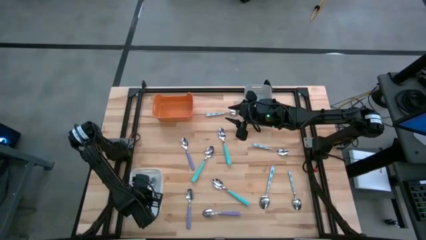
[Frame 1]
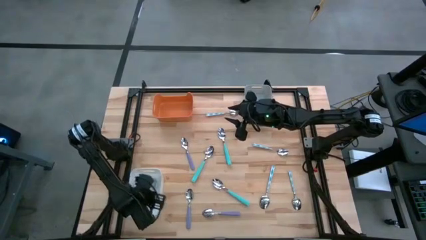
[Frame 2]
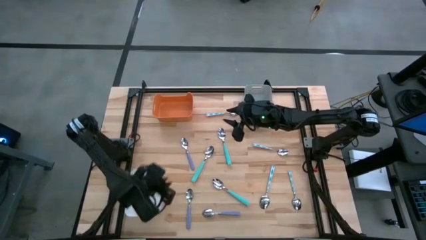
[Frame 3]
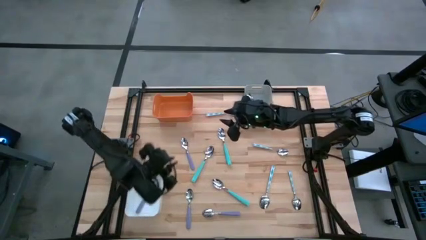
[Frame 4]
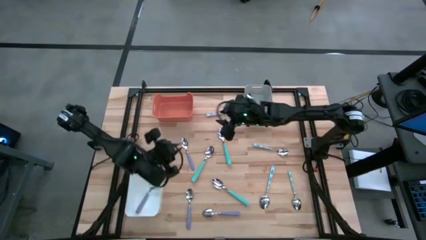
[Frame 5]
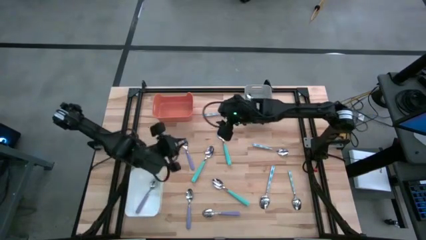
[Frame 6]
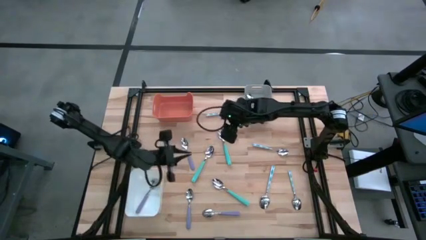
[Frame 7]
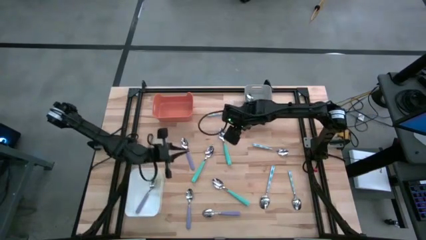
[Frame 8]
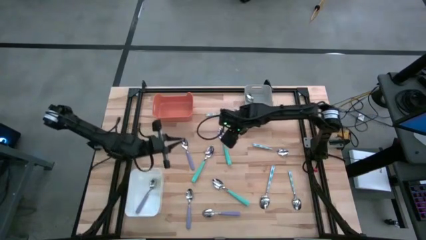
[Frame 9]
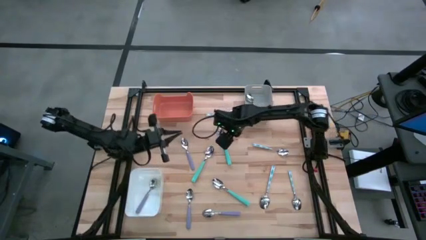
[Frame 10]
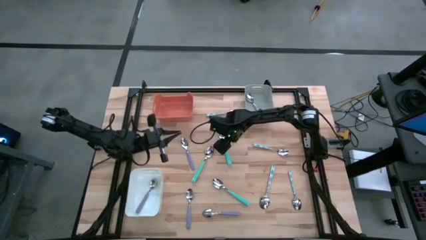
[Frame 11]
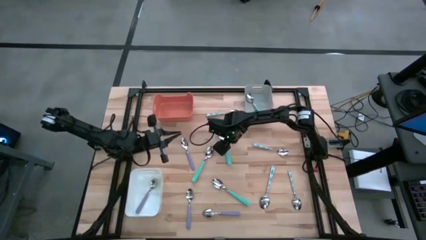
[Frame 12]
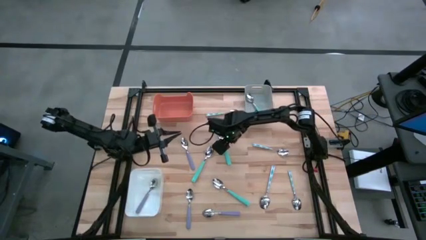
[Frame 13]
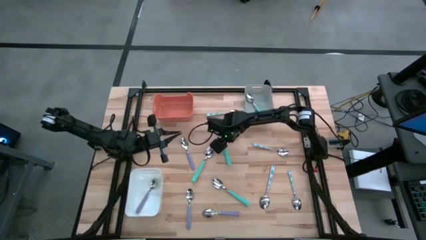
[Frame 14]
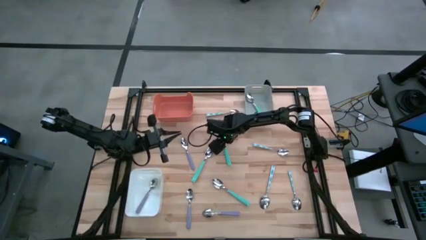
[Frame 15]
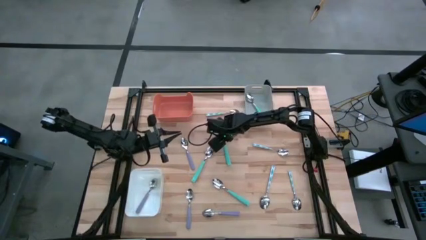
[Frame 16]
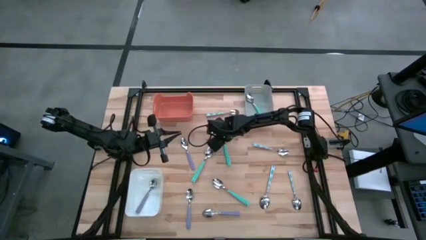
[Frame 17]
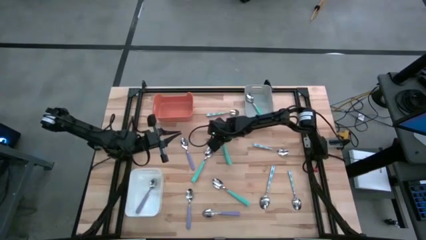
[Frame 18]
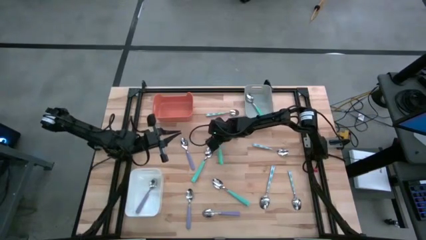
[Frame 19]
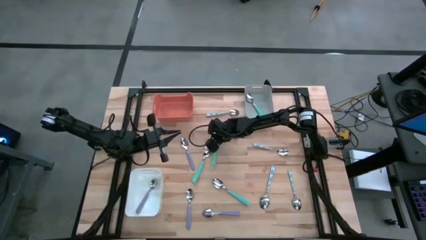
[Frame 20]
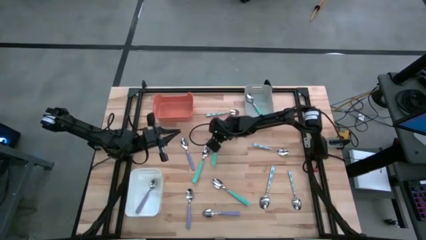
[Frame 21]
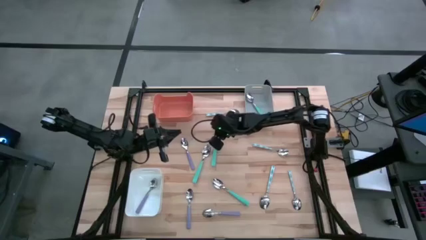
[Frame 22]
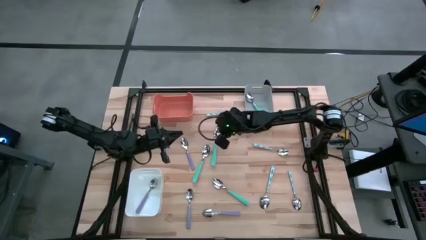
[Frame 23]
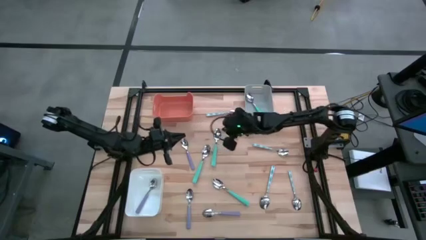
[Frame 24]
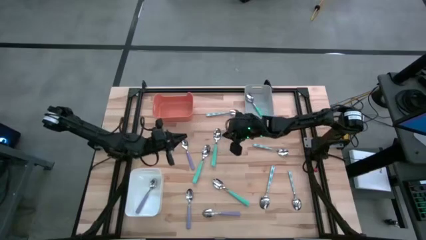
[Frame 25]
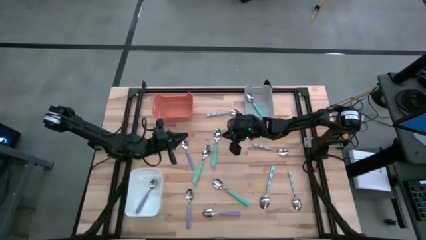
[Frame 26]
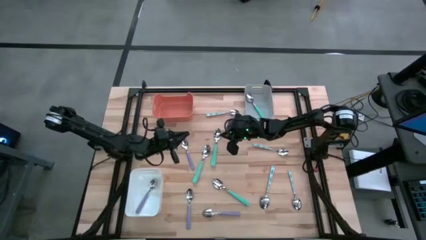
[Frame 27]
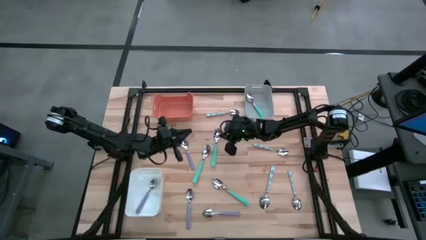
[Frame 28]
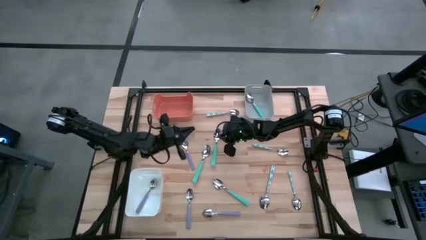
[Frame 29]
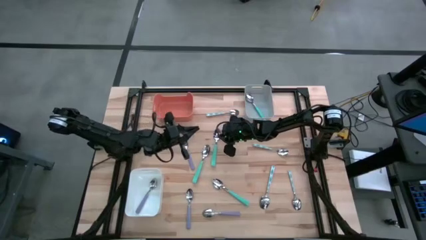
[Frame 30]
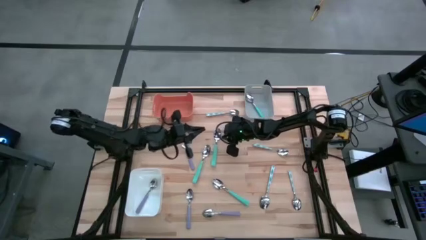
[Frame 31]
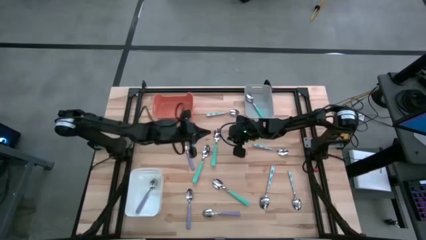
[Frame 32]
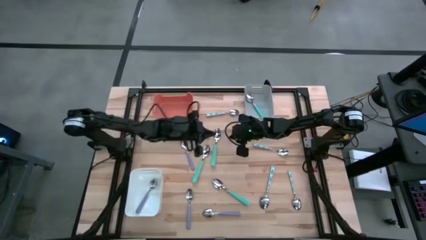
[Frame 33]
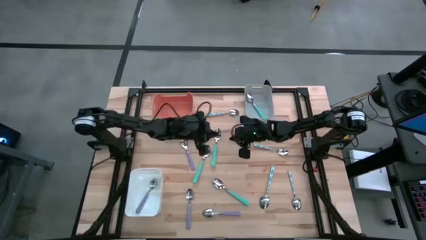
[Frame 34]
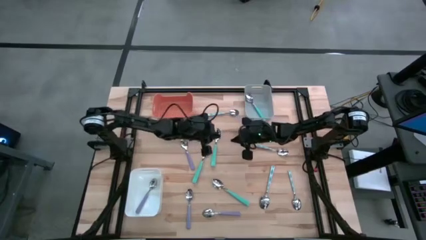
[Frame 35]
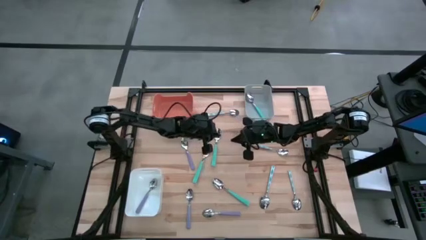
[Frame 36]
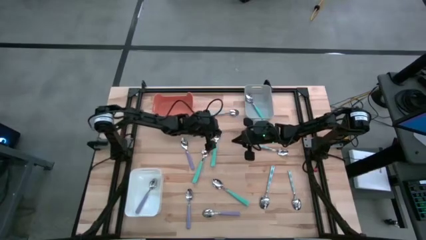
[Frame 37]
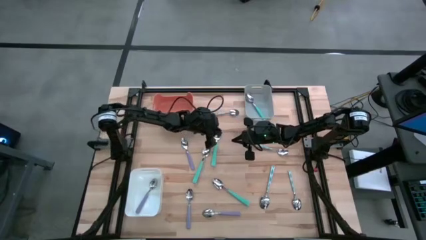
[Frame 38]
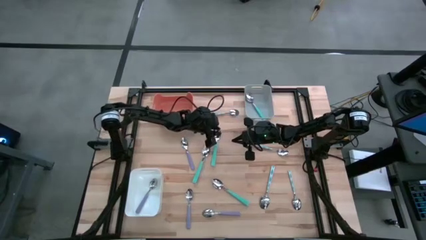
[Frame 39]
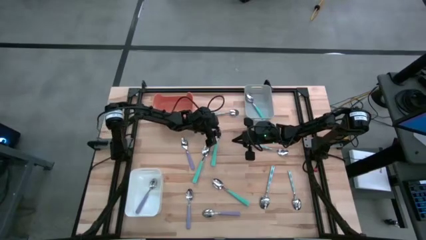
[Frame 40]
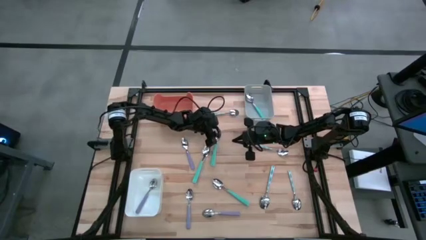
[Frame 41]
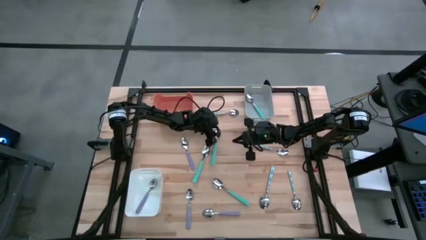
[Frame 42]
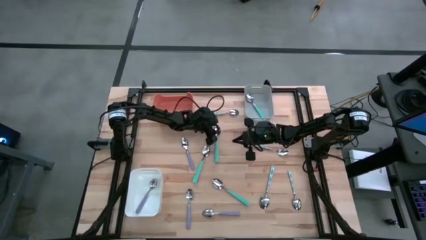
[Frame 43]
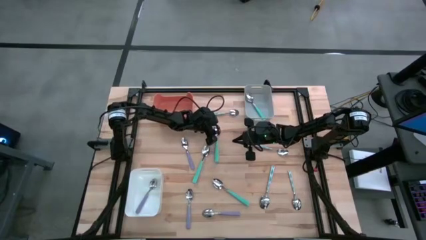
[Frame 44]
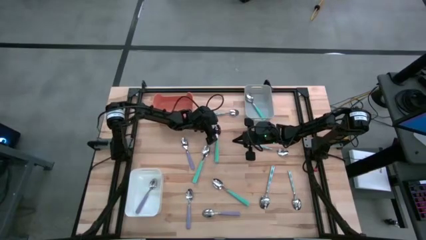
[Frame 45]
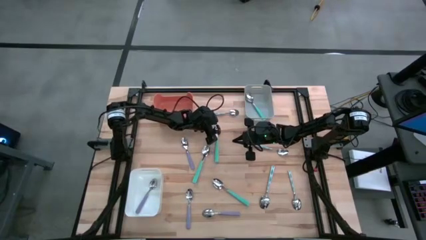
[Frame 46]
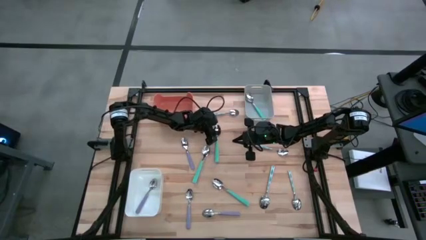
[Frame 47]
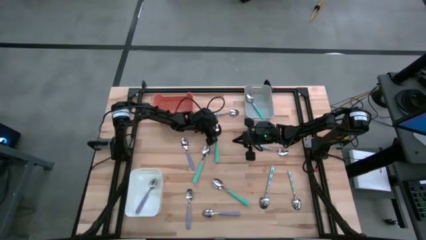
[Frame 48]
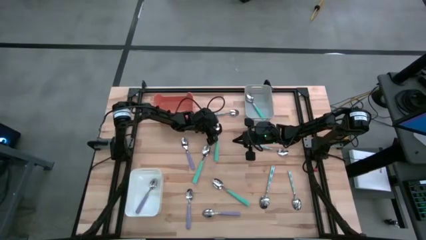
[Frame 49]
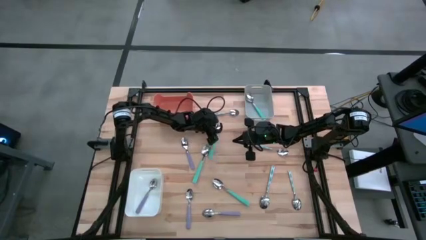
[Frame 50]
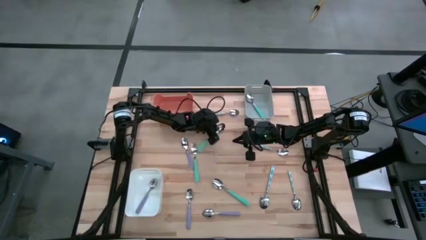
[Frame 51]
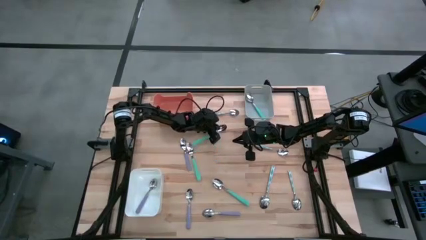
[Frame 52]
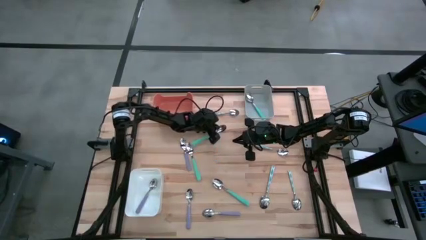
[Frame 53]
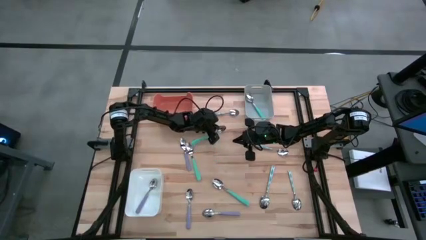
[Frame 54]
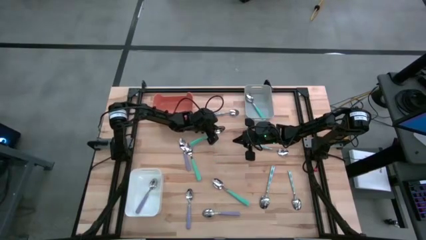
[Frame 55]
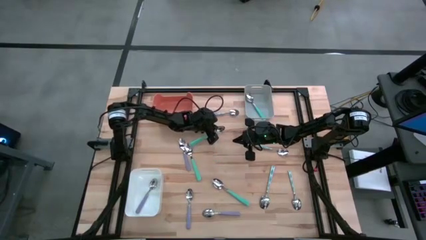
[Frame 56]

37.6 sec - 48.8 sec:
Task: Sort silverware by color (type)
Put the top right light blue spoon into the gray bin
